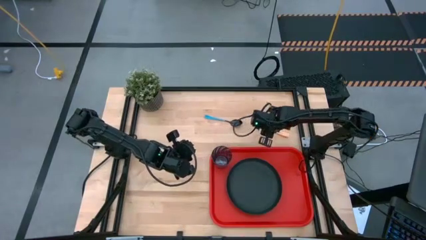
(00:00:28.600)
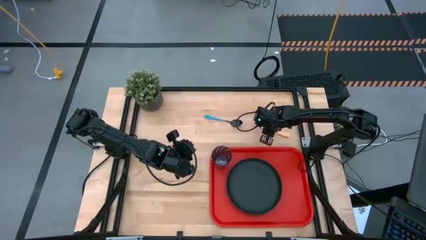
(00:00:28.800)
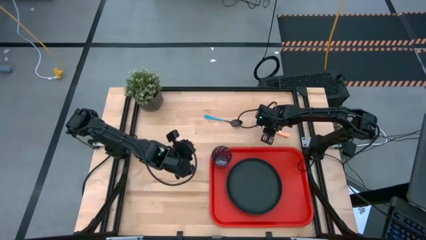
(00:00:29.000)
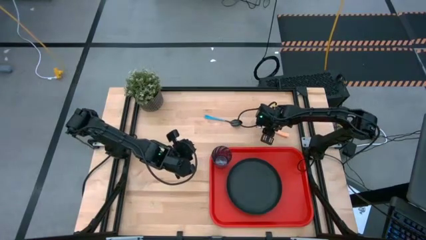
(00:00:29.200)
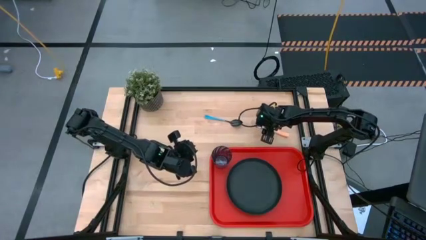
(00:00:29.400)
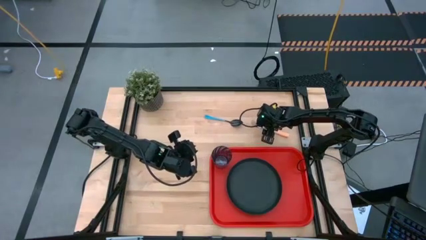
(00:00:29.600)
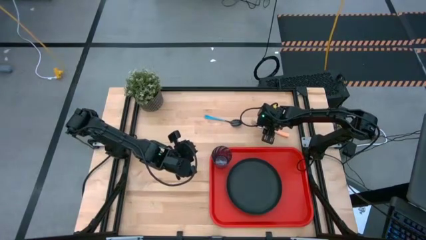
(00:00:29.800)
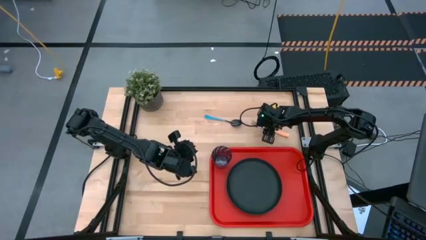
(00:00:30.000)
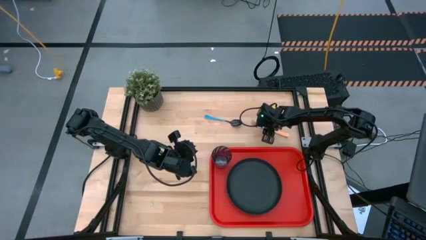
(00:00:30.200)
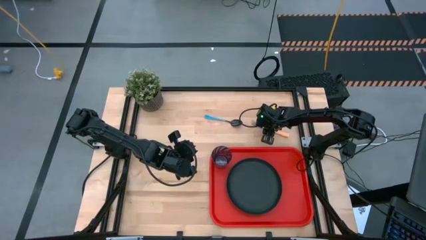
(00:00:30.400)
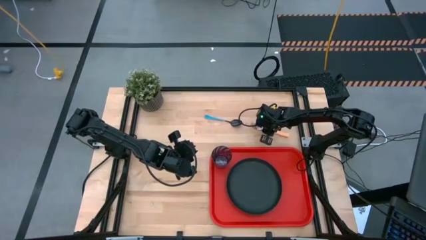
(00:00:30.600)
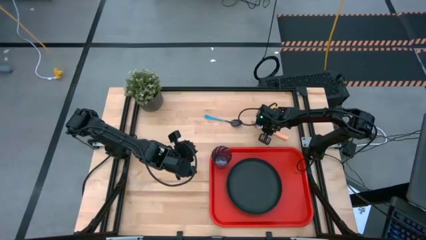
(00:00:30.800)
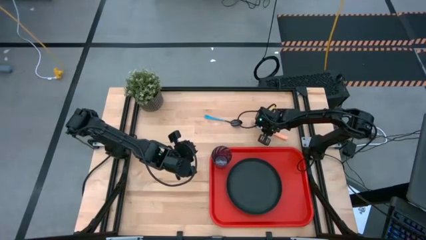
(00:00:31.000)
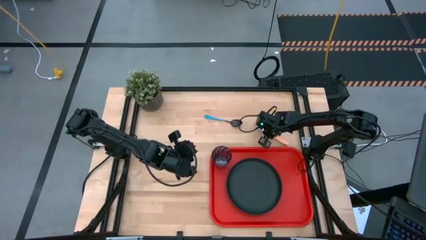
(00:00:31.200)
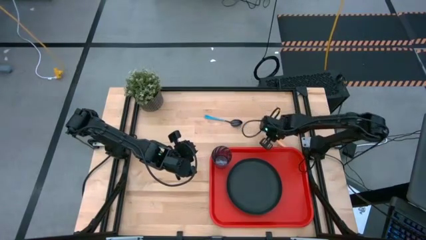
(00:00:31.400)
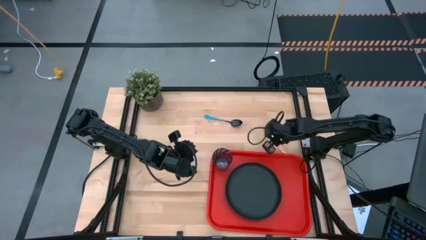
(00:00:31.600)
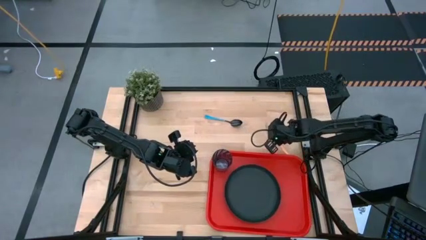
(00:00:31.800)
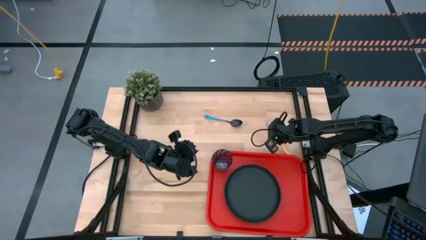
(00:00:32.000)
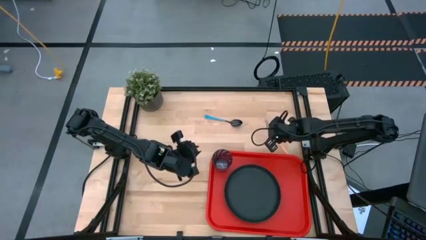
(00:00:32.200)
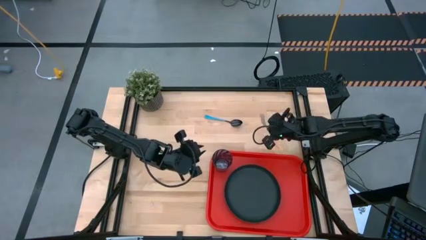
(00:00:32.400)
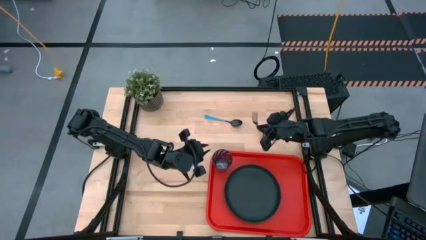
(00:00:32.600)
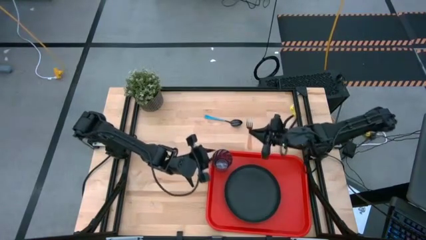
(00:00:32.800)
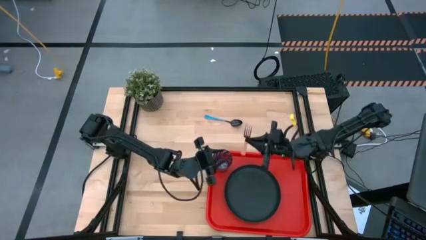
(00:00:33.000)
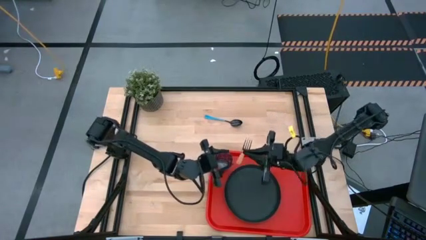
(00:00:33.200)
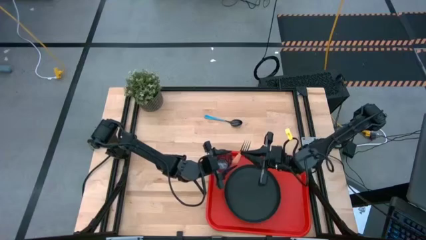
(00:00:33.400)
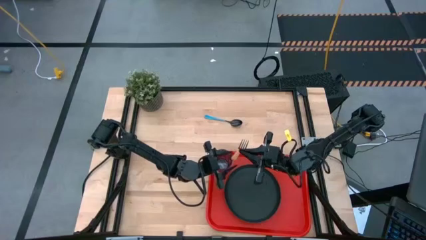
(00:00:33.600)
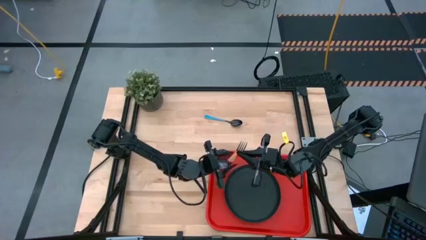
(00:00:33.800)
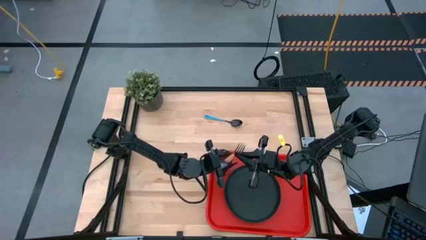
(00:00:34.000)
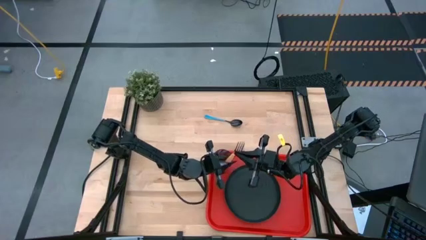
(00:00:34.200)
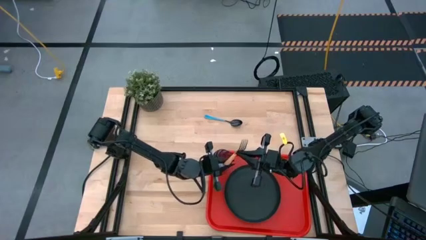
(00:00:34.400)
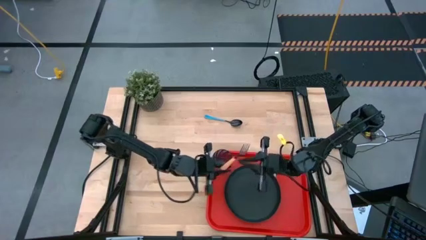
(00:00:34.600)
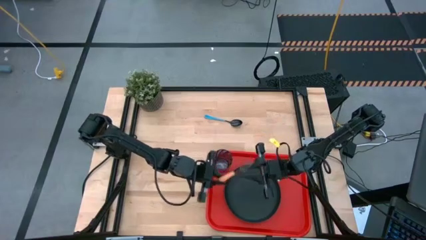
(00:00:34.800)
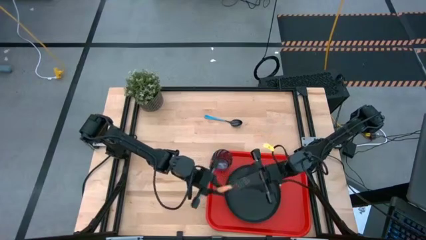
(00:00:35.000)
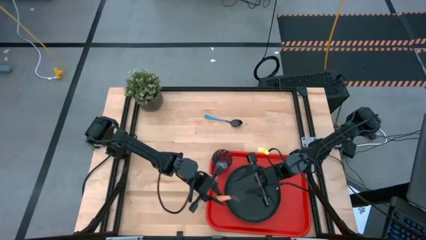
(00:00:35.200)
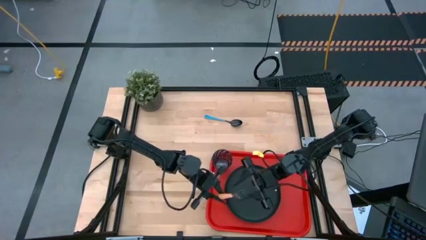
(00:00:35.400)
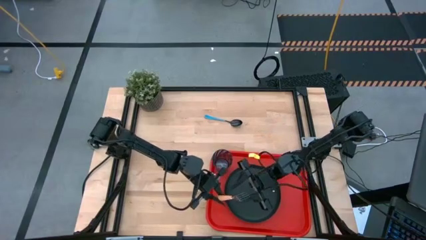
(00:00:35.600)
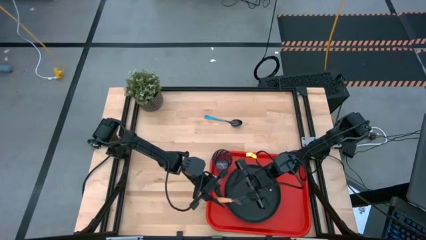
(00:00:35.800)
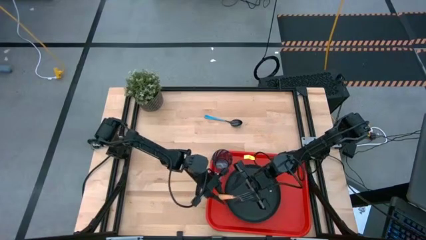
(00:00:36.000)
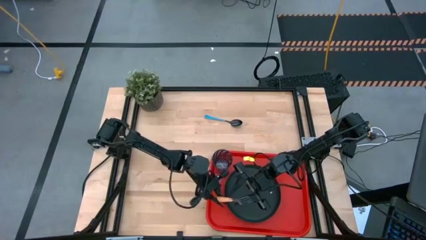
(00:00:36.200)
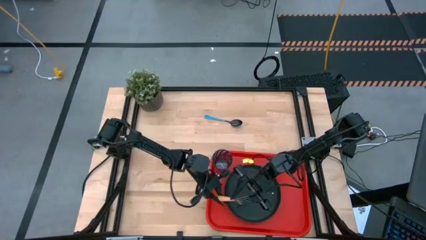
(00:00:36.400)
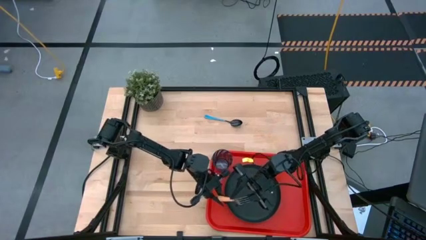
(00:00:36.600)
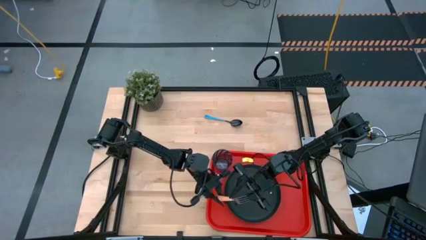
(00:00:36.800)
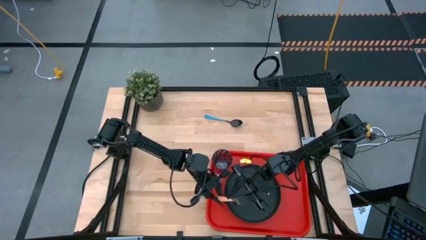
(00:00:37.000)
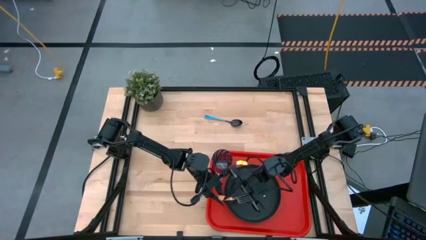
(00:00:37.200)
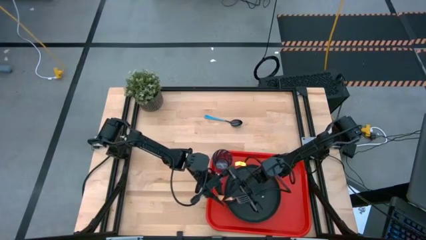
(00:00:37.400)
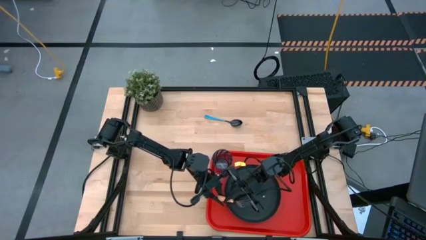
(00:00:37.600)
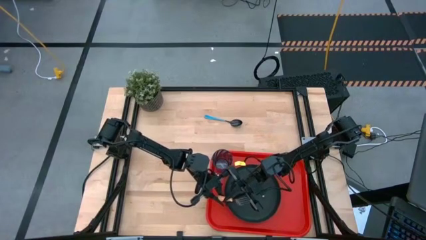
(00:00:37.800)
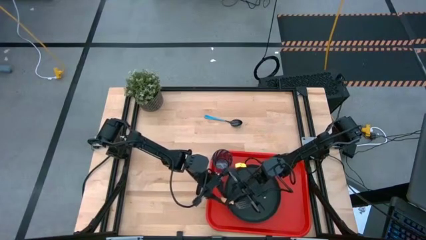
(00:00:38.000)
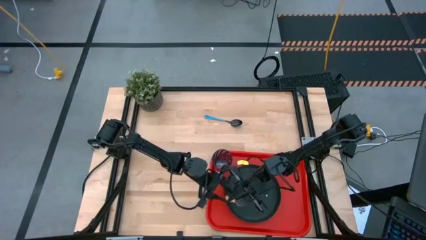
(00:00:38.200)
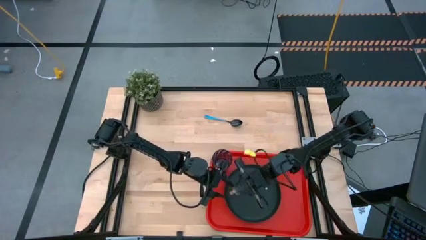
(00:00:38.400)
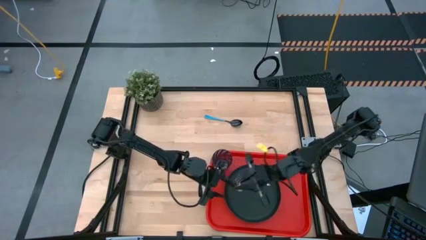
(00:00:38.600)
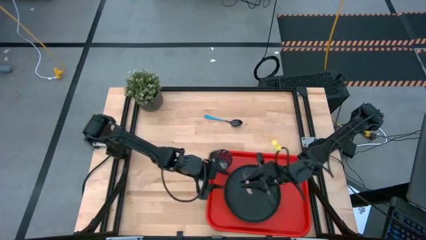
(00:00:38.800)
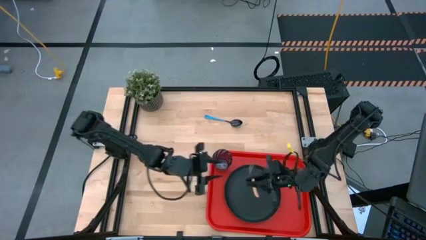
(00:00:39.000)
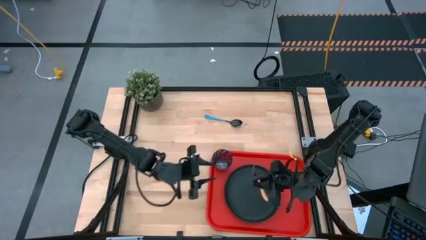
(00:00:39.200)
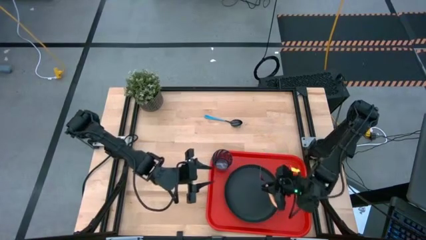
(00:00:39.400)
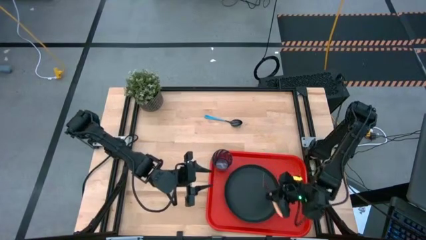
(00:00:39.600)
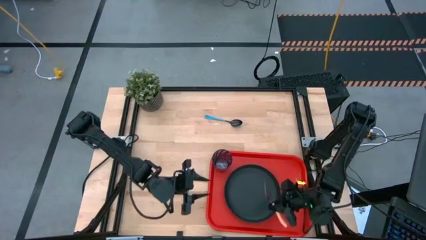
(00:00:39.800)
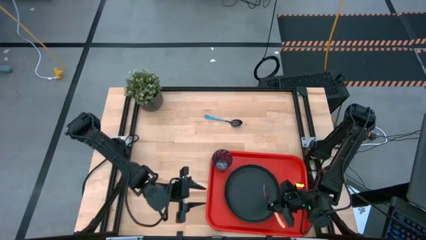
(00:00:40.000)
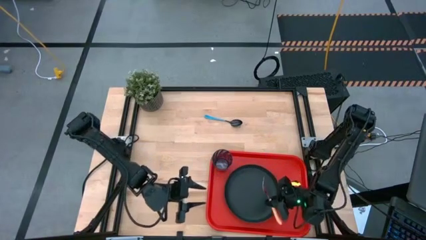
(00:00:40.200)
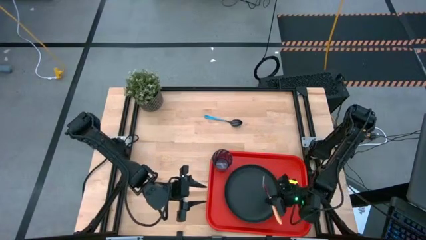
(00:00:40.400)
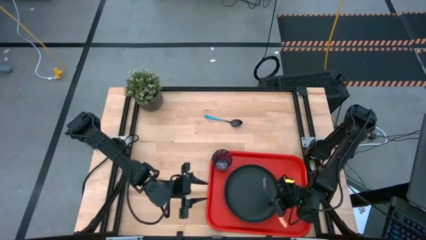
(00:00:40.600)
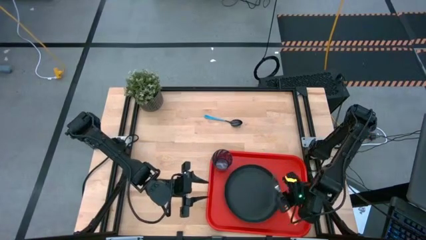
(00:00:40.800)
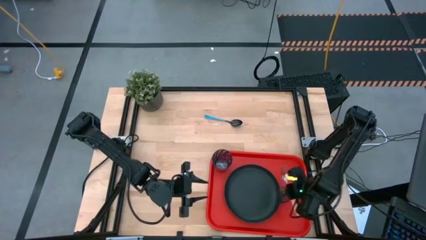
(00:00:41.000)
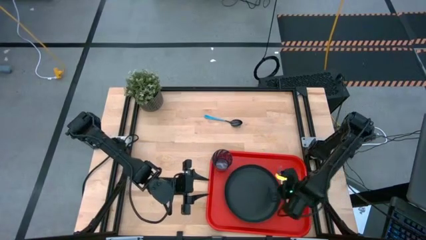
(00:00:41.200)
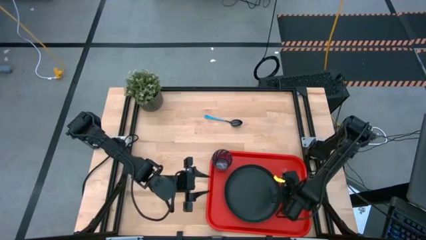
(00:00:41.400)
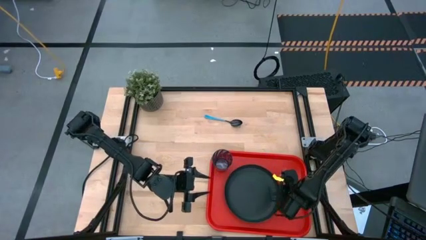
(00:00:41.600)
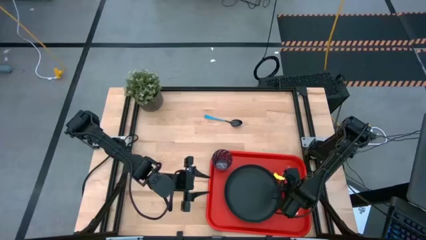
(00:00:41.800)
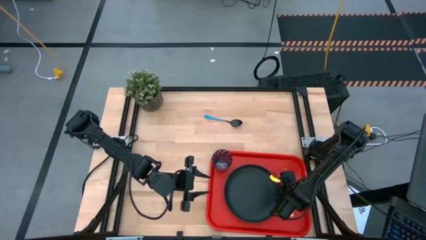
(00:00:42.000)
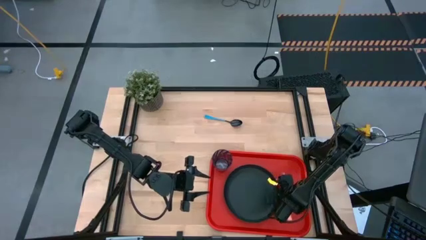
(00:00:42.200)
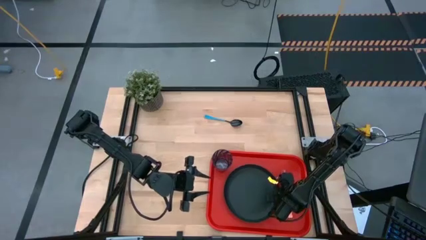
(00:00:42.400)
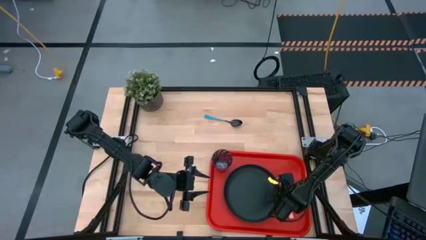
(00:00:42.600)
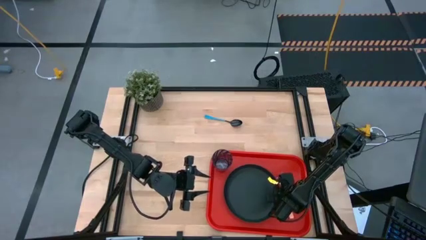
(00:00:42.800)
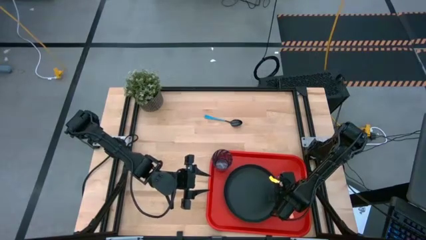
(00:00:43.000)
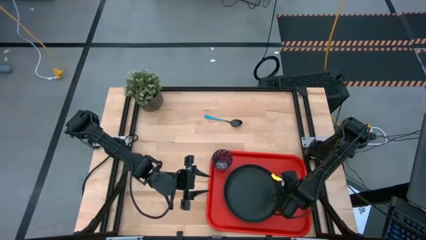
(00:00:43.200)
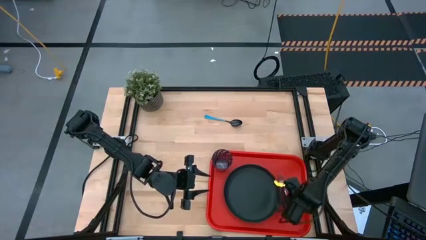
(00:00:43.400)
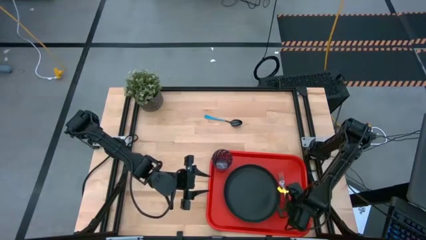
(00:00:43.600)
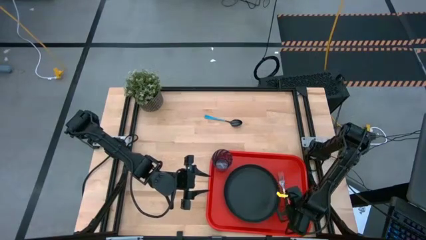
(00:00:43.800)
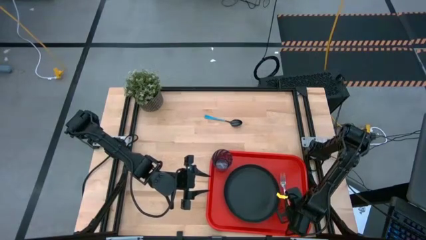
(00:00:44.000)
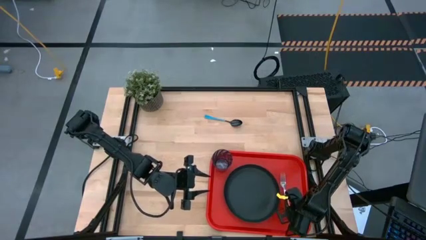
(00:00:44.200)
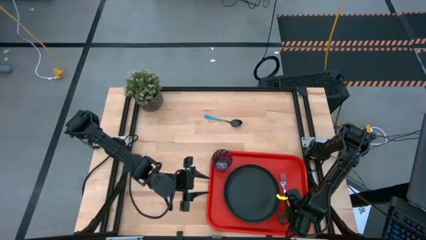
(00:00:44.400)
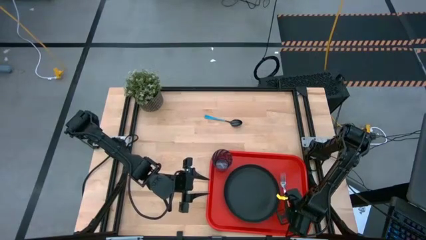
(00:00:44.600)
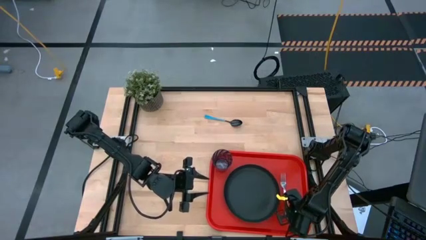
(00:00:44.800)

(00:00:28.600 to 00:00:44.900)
Task: Pick and place plate/cup/fork/spoon on tray
Put the black plate on the tray
